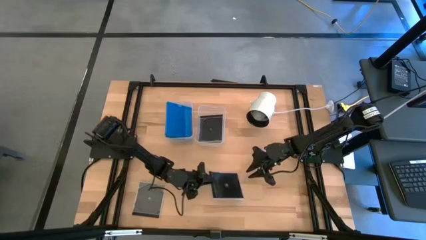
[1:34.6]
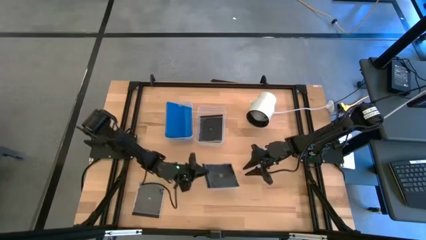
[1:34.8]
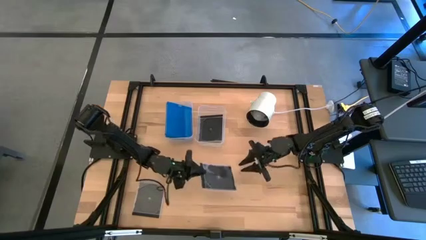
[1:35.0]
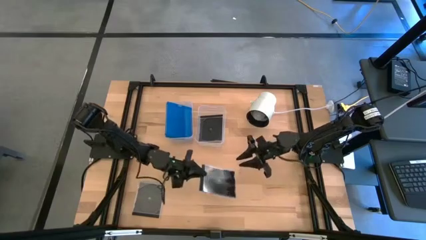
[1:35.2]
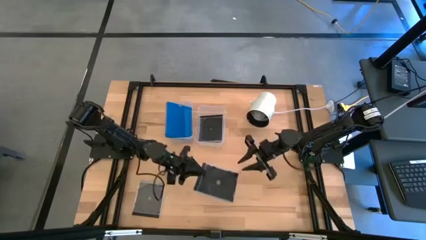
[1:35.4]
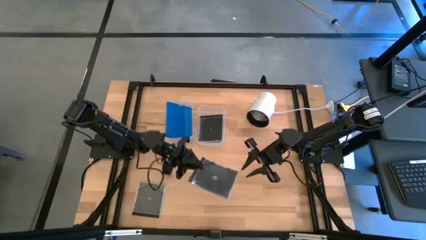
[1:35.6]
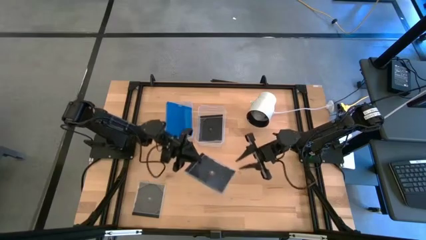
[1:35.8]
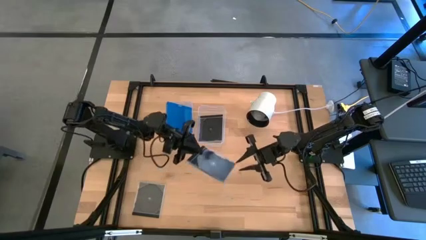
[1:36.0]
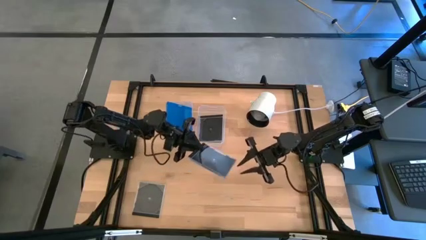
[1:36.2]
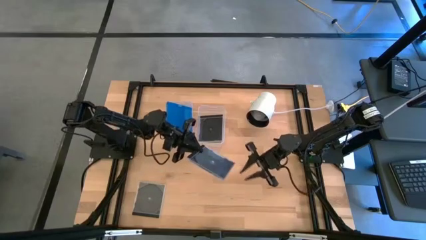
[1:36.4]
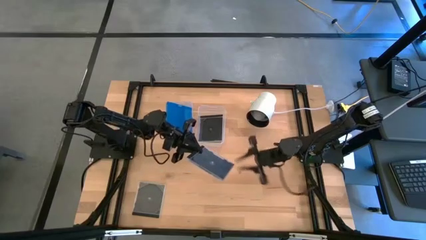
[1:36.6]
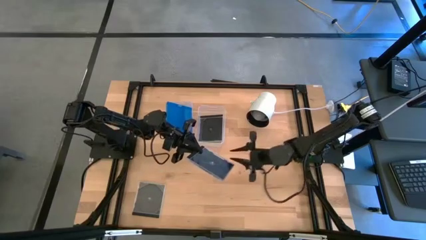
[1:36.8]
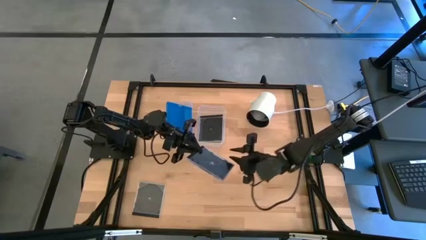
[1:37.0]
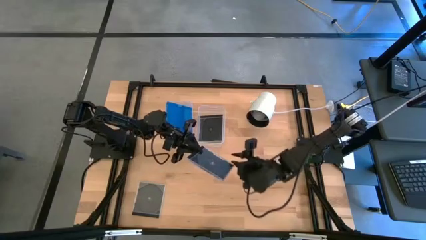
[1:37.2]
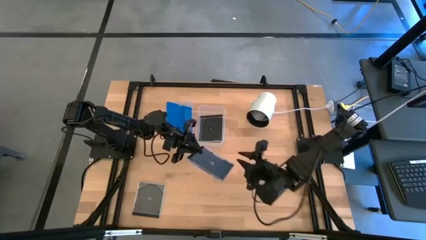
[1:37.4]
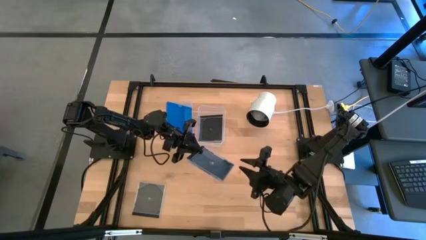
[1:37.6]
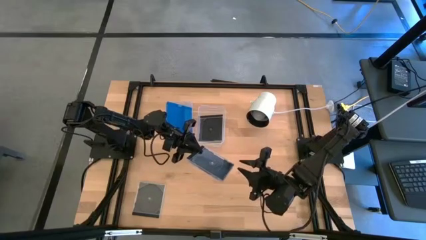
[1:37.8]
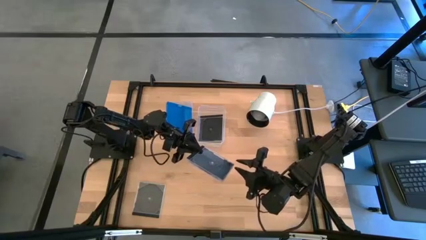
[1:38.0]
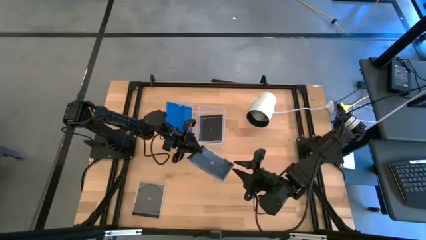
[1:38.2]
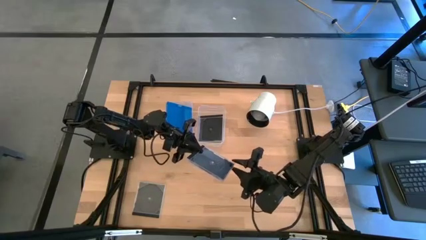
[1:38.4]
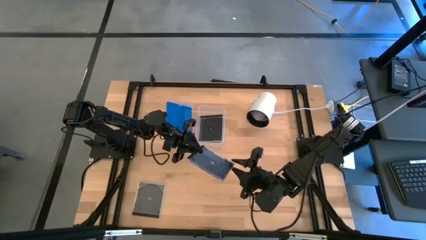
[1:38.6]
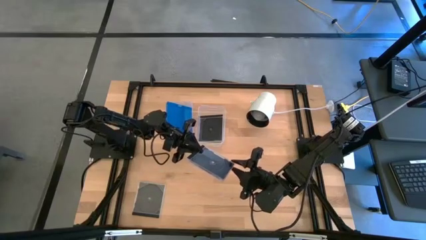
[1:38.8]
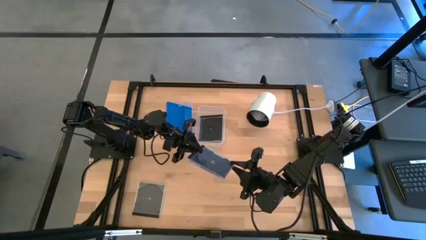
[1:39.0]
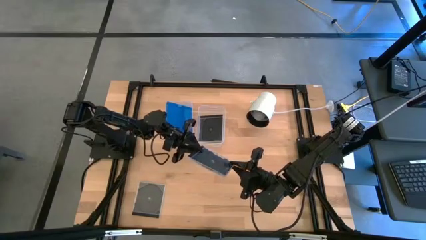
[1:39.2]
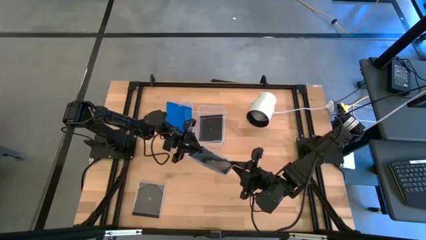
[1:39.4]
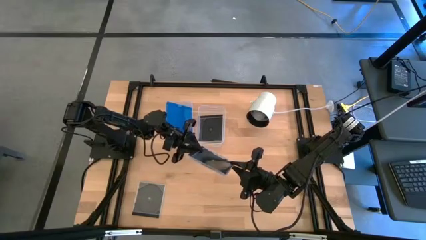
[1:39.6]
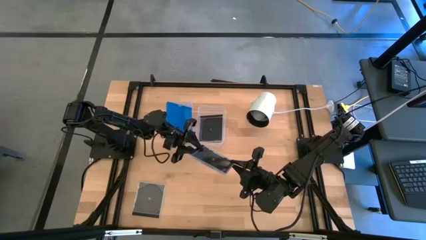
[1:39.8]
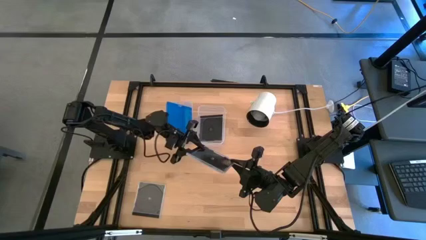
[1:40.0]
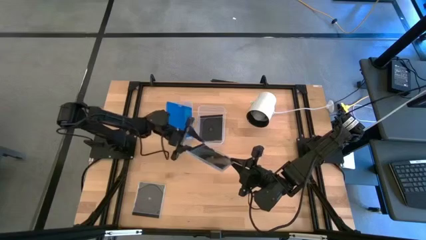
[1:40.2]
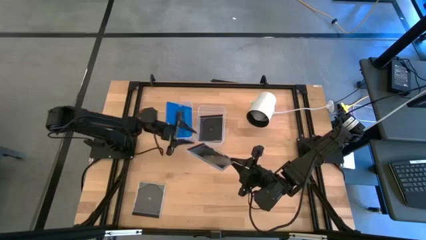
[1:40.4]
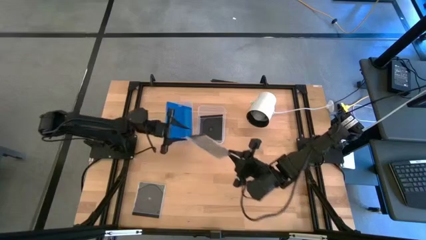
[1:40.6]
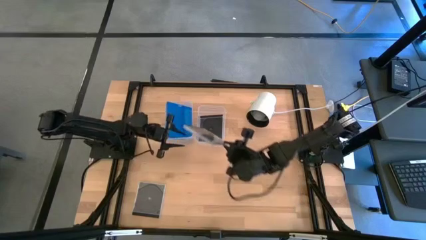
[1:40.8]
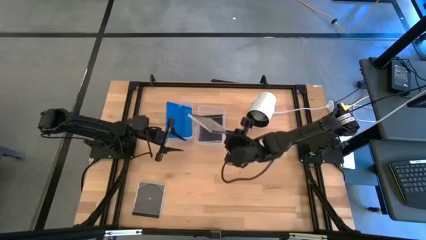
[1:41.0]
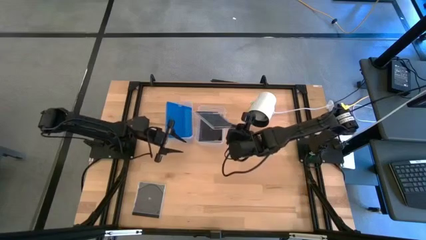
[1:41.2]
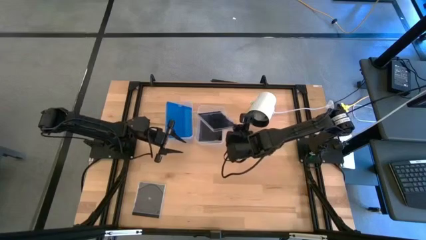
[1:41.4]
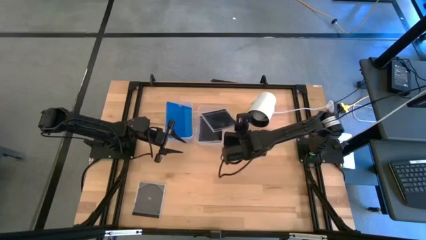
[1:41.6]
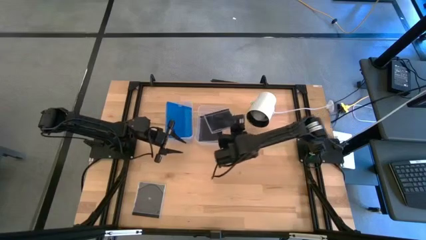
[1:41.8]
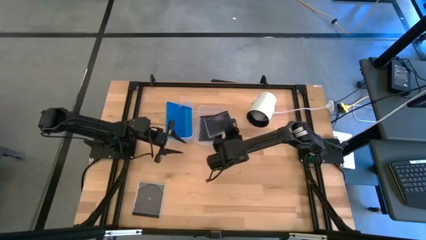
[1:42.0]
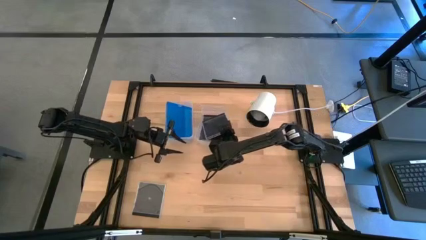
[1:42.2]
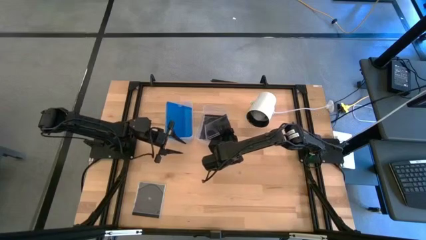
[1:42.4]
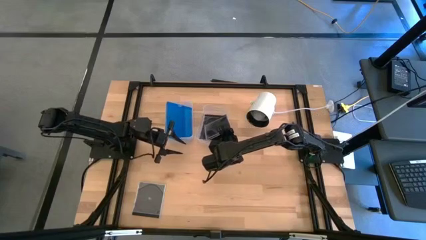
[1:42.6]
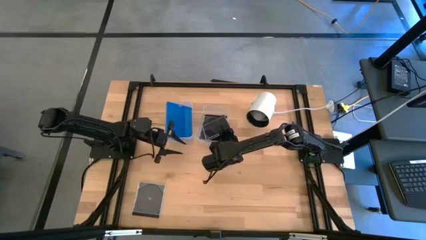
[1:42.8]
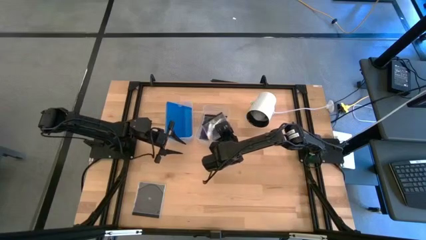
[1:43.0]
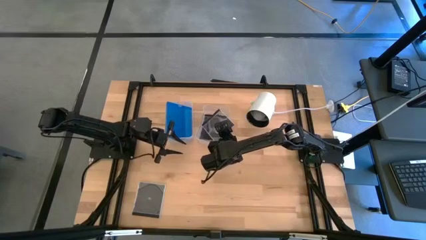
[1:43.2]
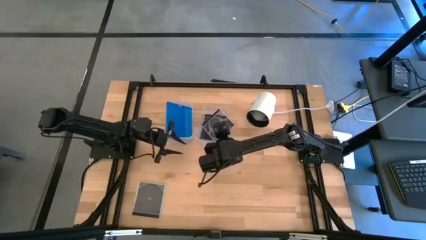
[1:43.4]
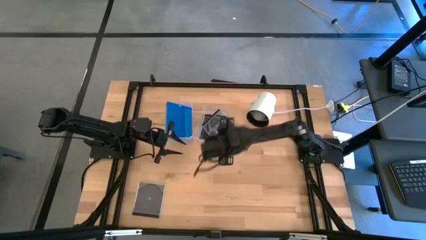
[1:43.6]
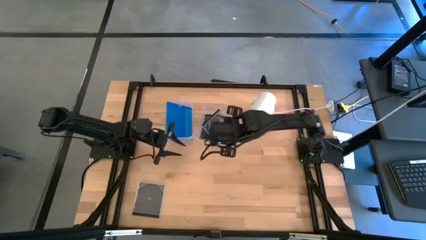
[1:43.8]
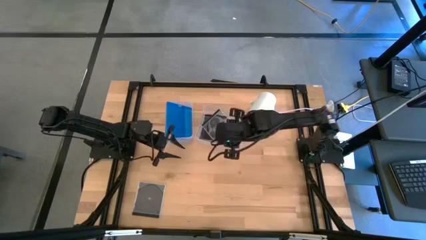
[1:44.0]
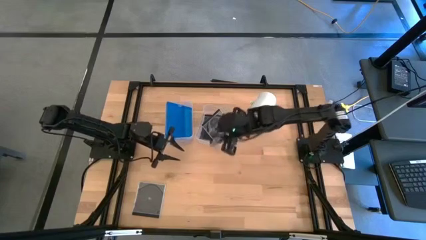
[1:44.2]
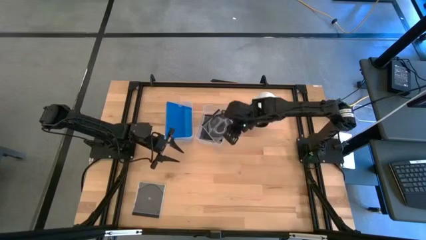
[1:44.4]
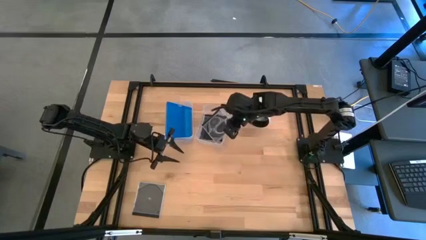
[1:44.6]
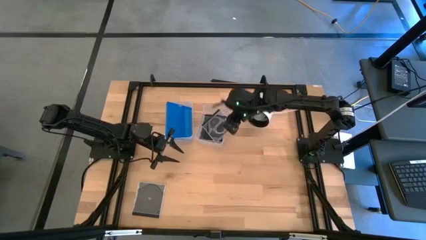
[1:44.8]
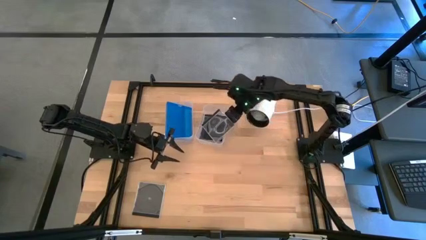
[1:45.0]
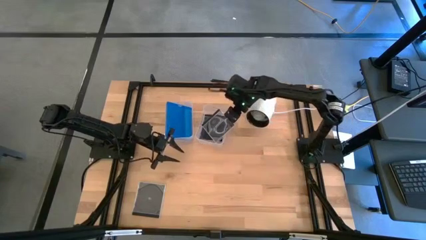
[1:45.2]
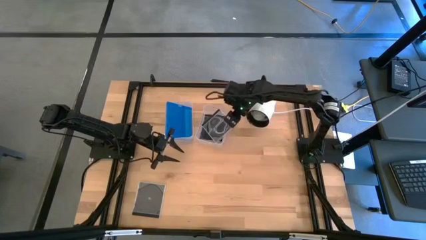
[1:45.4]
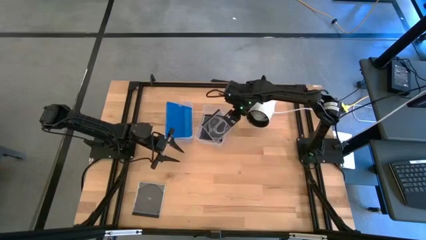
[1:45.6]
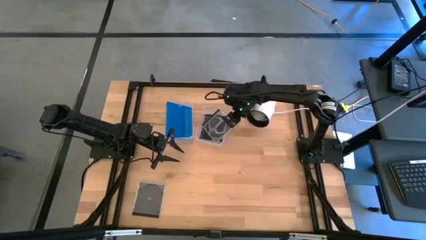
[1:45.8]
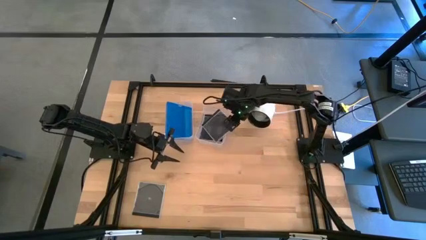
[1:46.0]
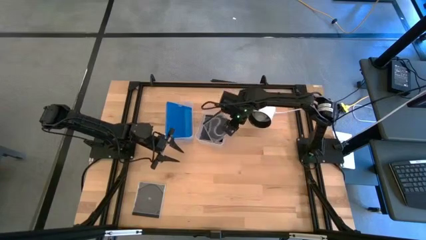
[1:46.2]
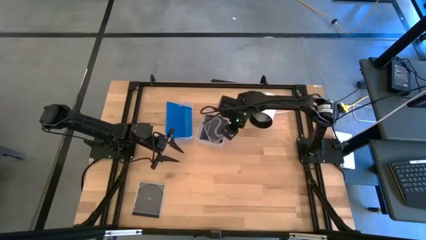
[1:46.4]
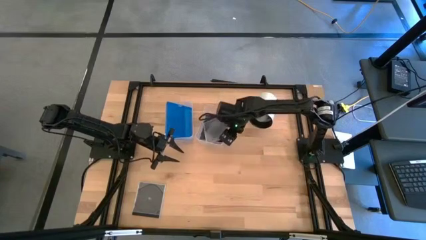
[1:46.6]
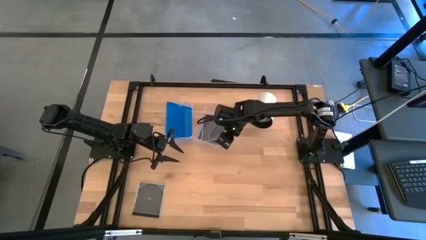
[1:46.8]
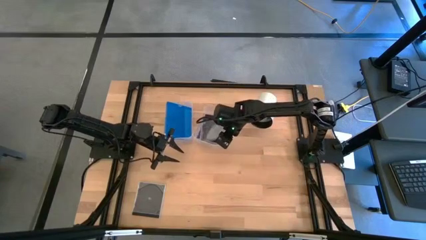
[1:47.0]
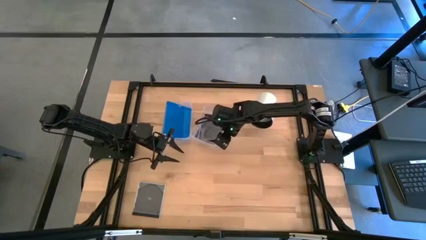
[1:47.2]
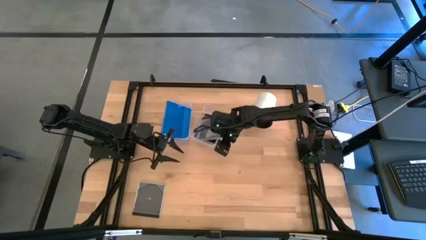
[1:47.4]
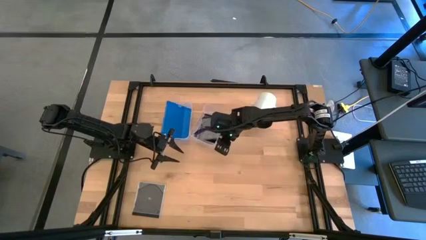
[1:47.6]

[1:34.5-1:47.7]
Task: Pick & place jewel cases by type
Put the right black cd case into the right transparent bin

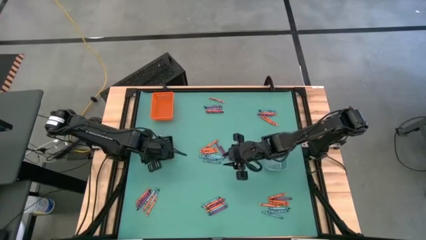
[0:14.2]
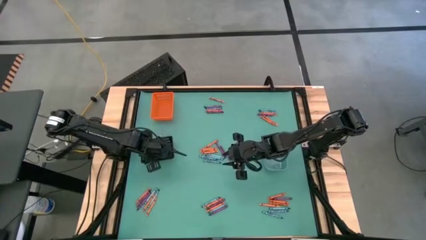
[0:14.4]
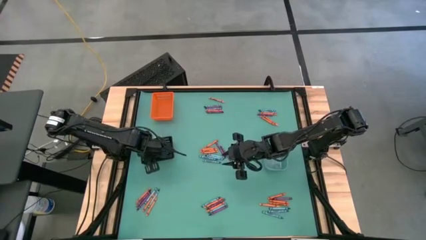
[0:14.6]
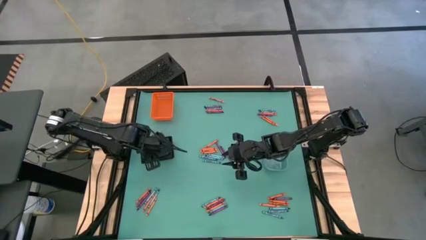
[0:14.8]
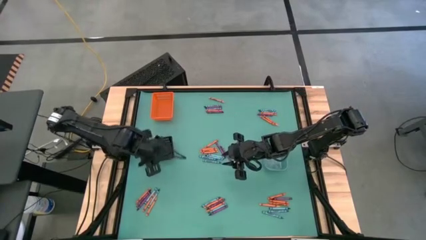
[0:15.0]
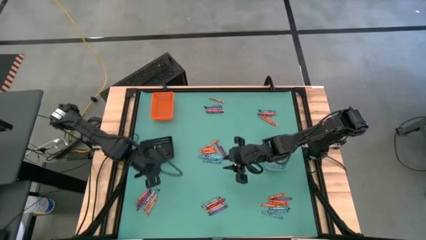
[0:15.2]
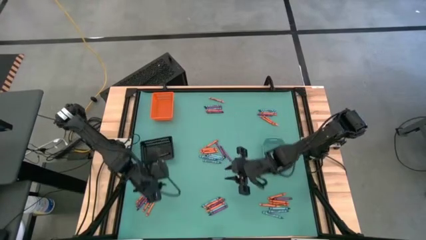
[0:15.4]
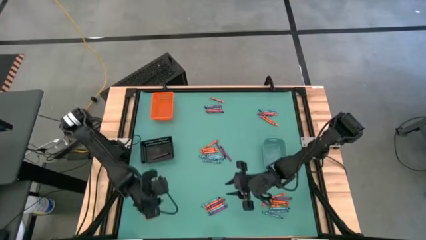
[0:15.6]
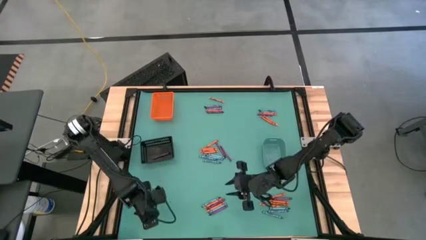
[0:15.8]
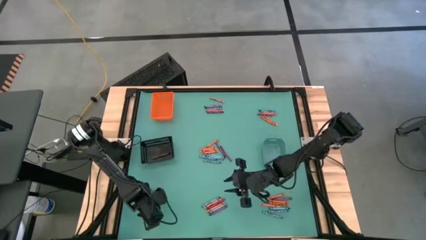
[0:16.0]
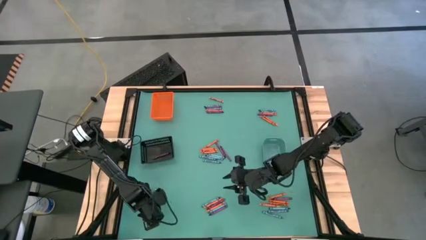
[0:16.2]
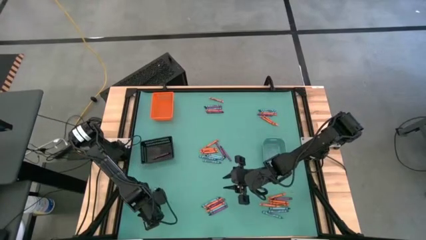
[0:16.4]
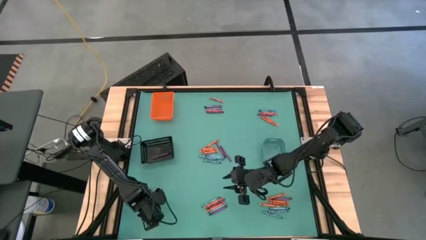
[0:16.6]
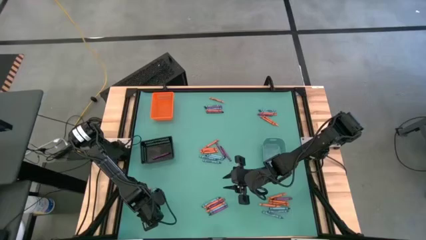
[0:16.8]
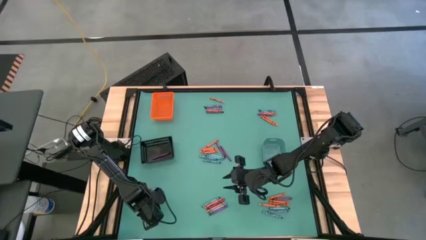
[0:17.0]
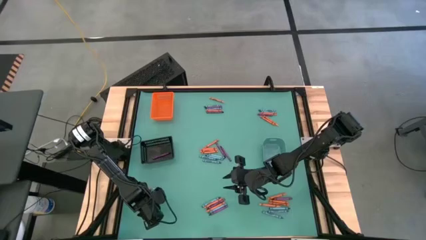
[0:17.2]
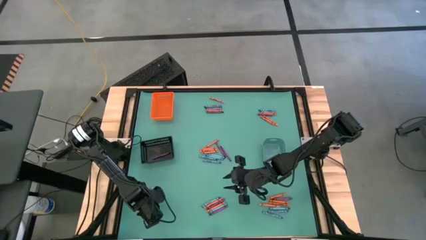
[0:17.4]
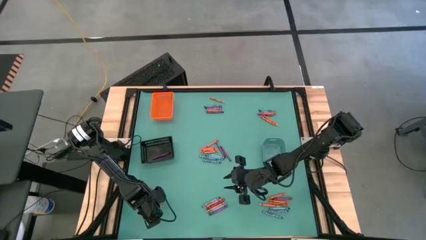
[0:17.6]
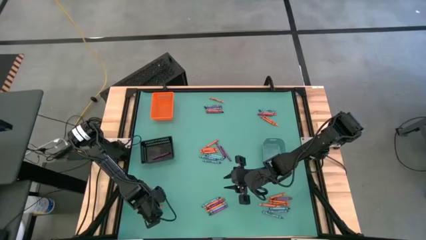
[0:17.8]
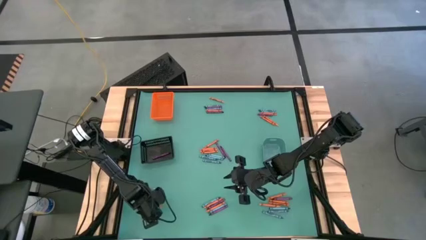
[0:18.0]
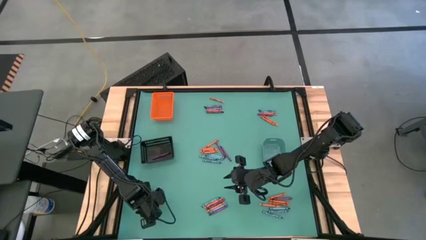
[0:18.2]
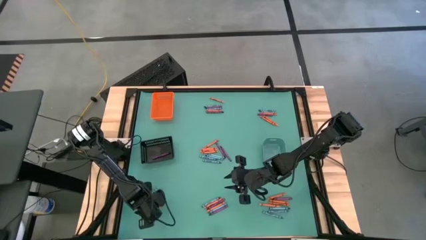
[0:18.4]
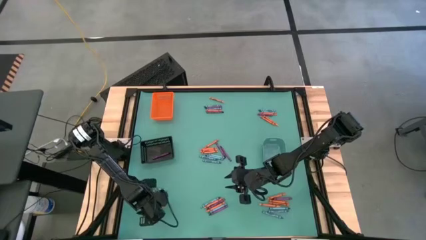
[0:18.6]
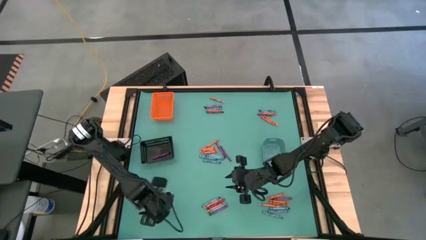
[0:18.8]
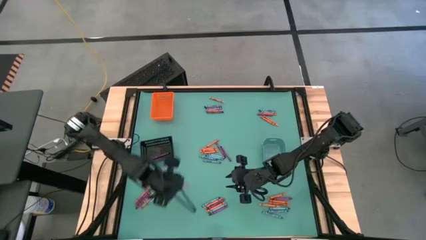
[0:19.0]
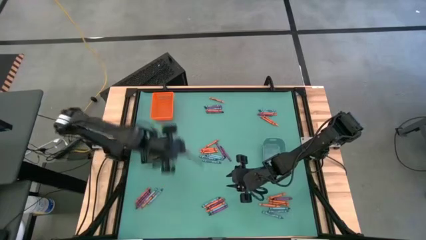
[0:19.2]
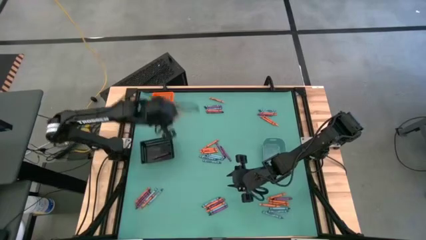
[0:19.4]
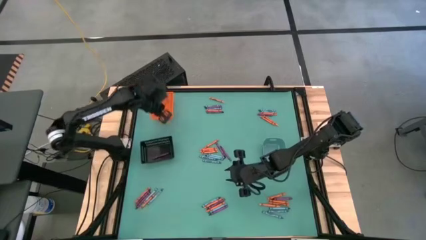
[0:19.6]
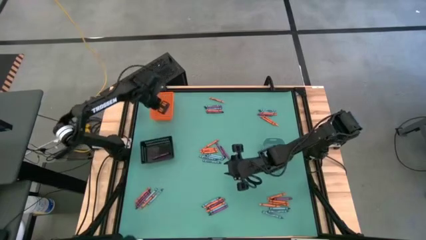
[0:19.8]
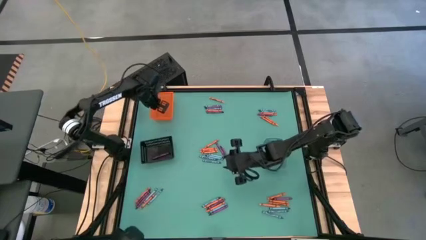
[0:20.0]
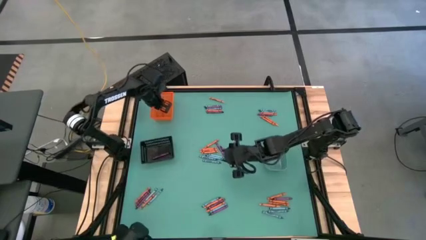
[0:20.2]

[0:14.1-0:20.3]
Task: Sort crayons
Put the orange crayon into the orange bin
